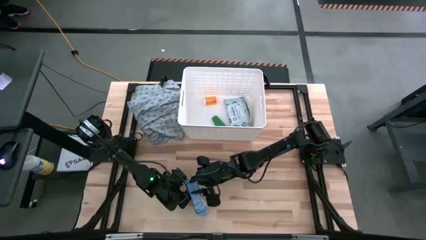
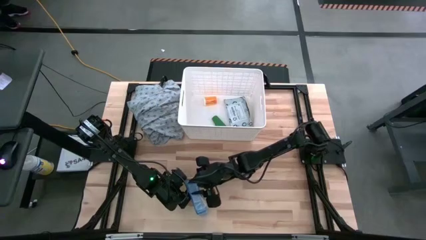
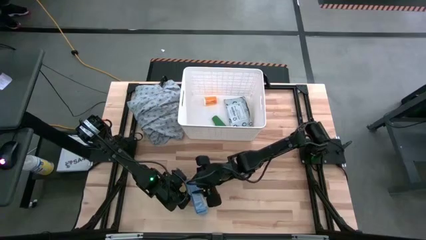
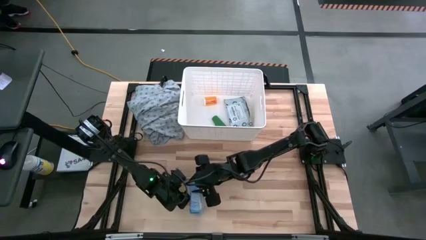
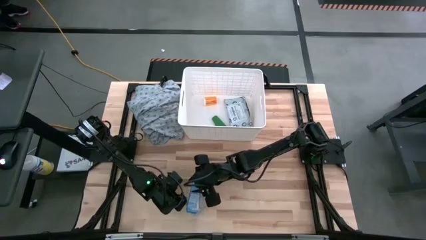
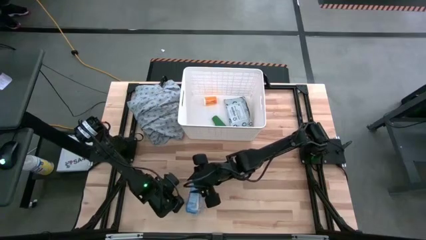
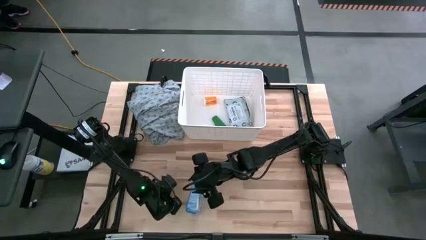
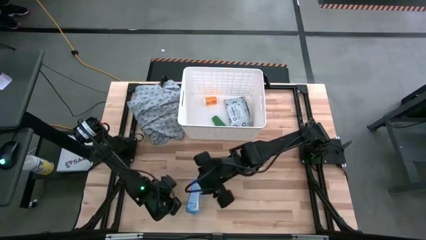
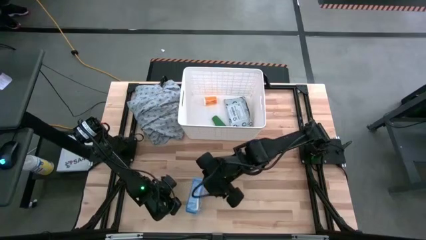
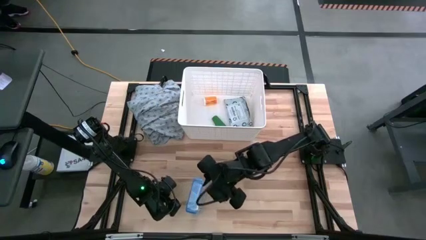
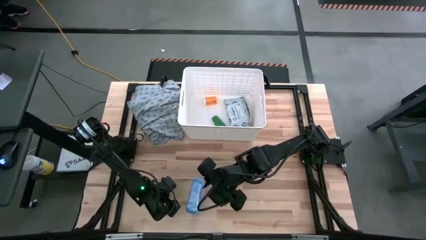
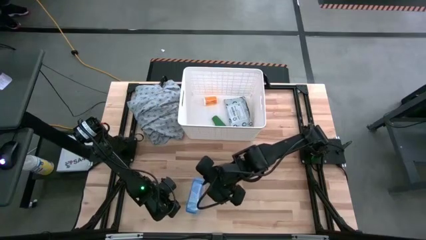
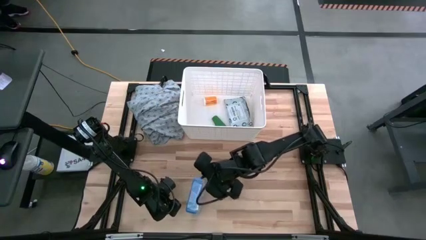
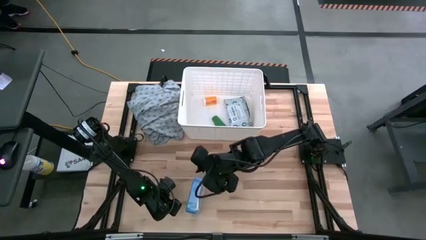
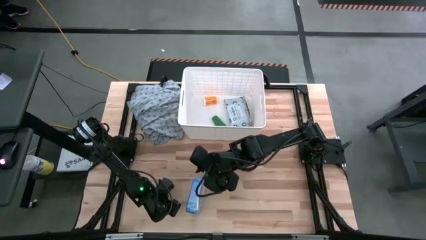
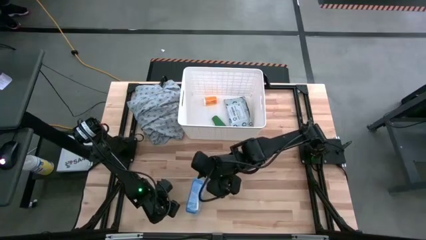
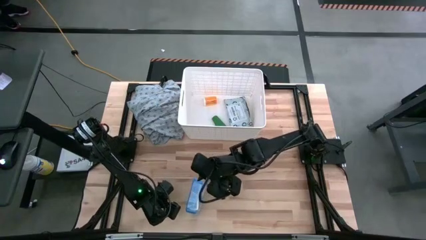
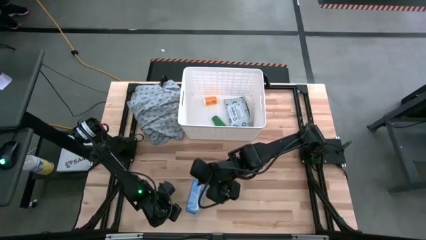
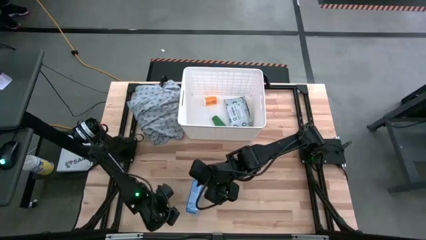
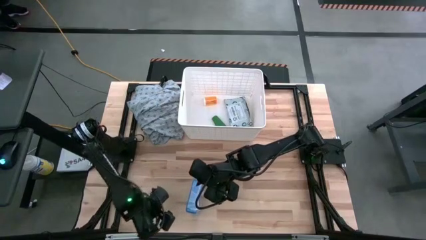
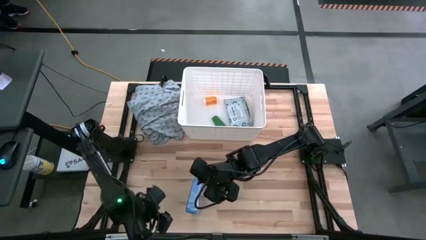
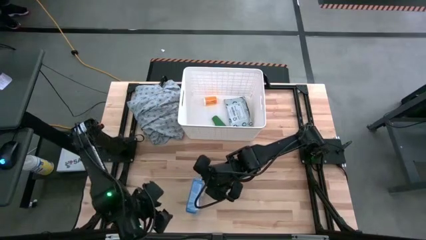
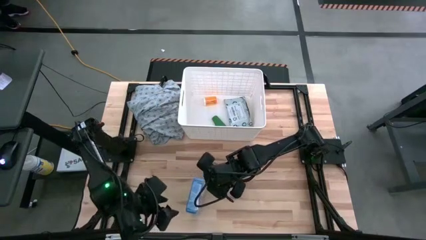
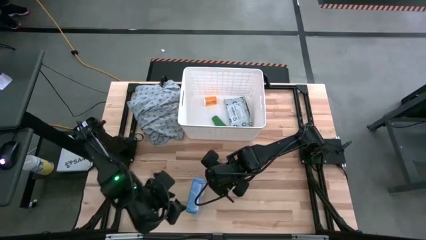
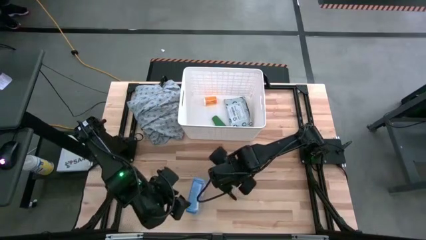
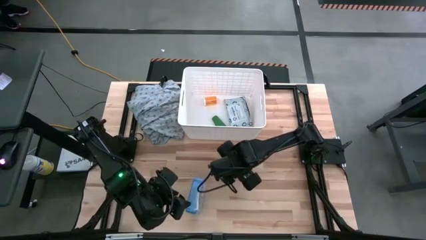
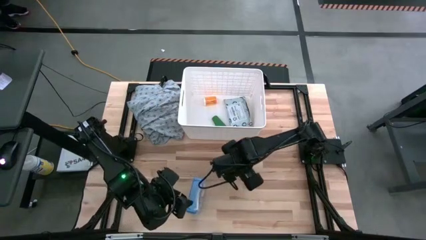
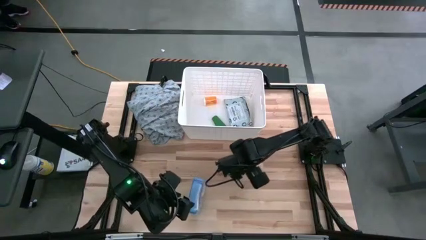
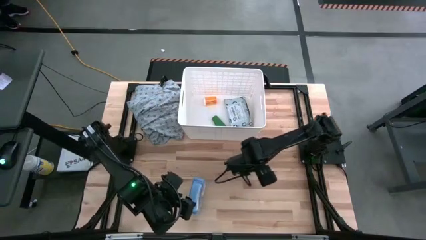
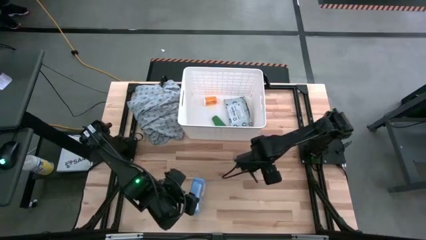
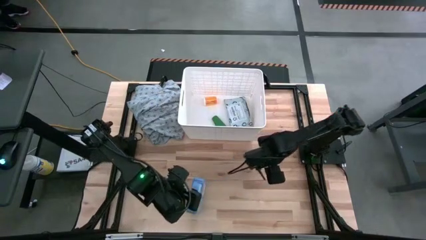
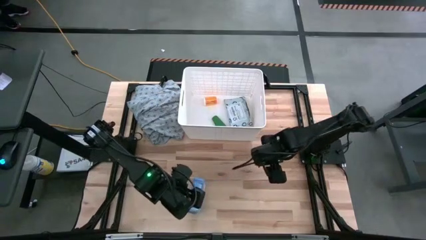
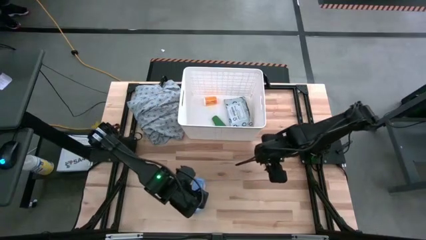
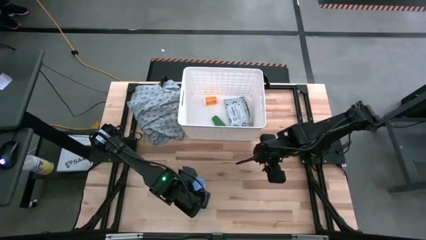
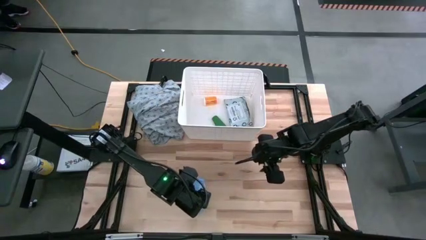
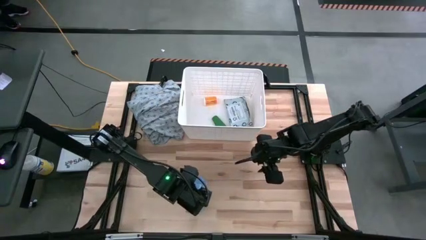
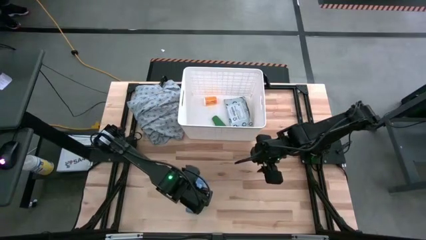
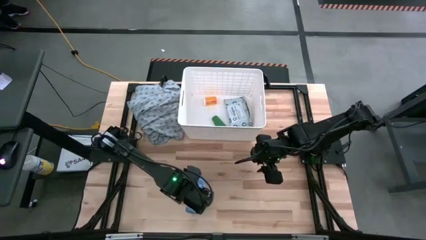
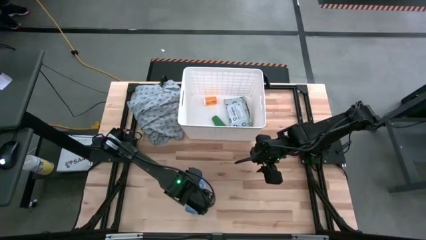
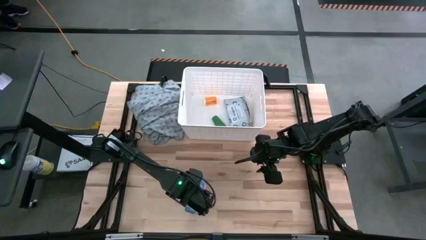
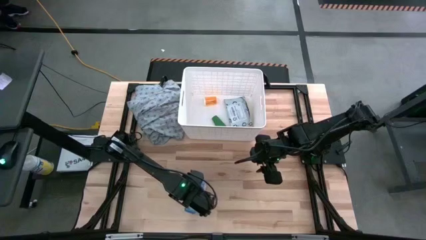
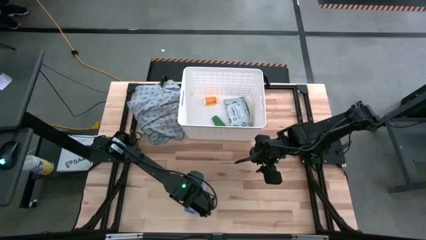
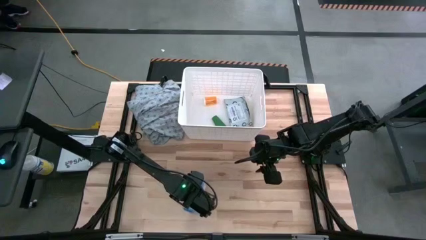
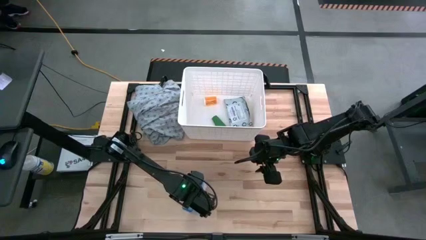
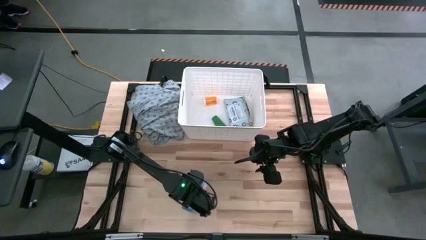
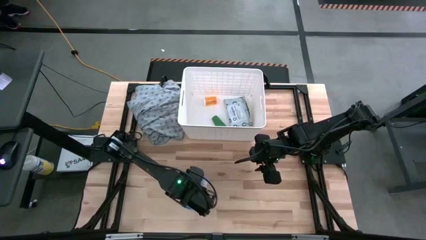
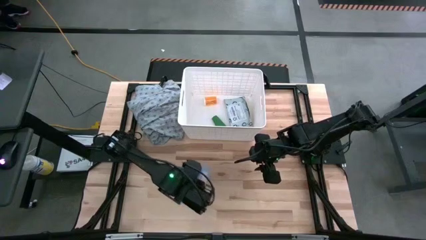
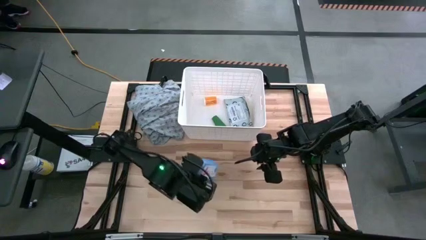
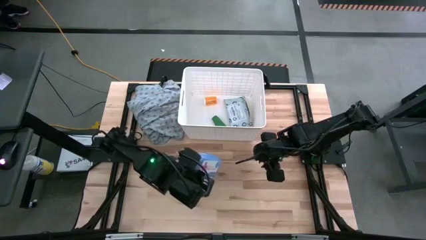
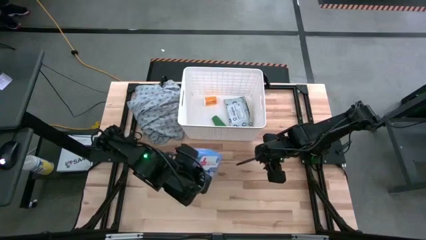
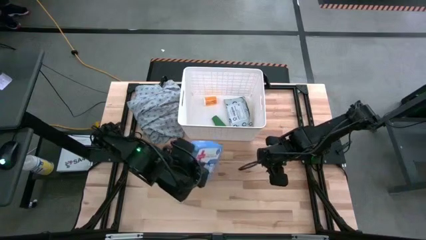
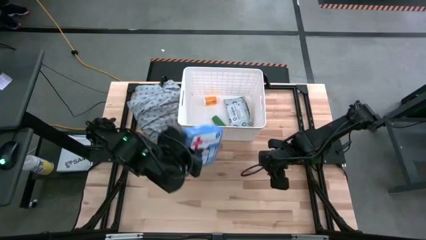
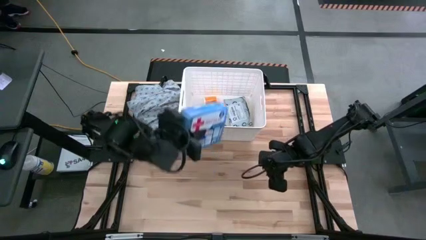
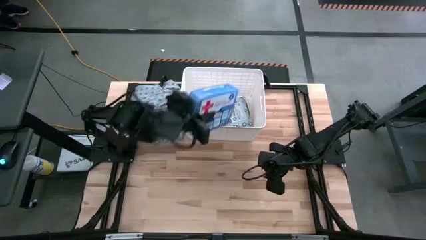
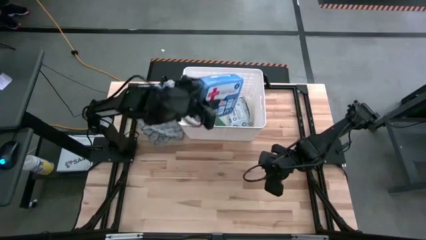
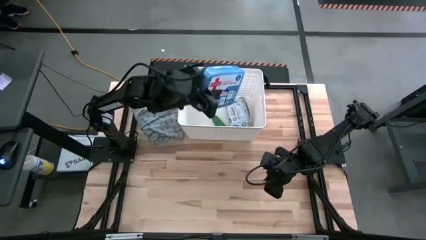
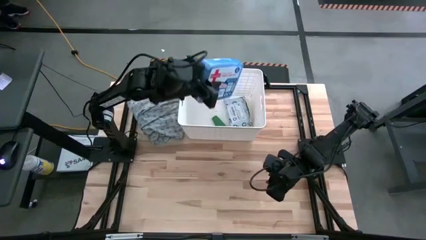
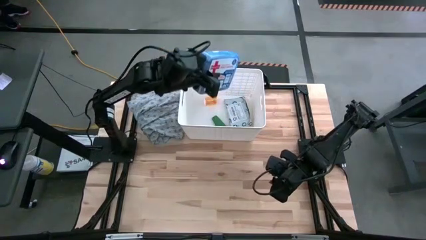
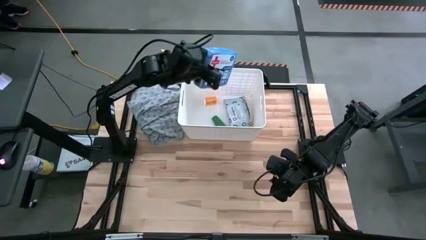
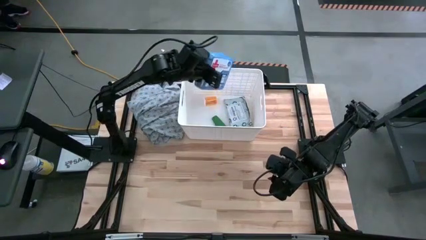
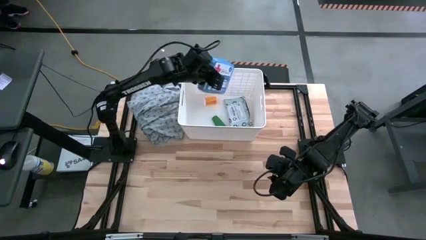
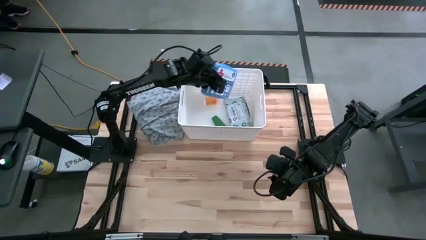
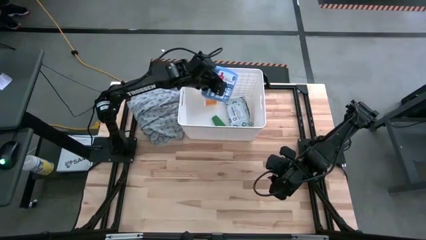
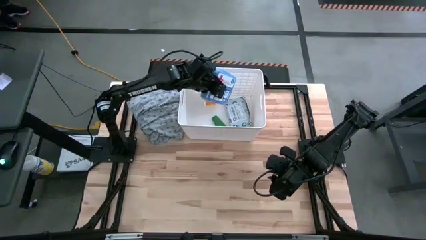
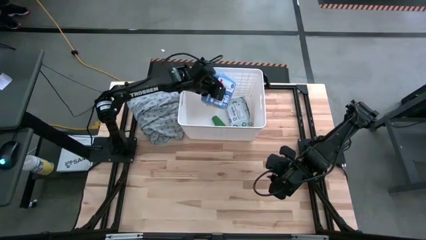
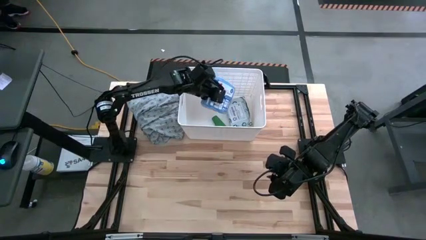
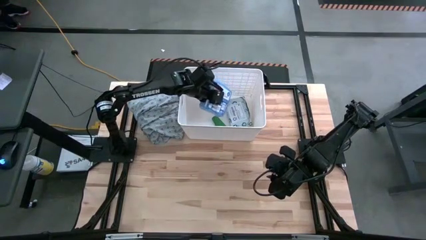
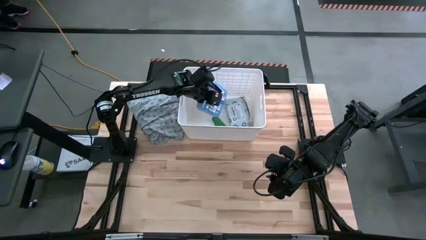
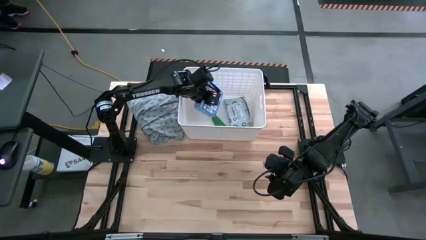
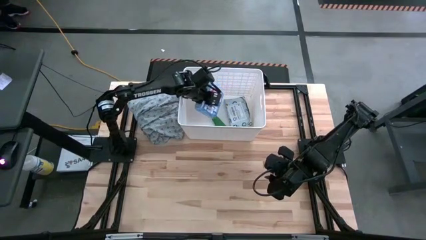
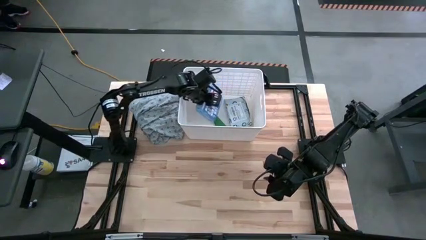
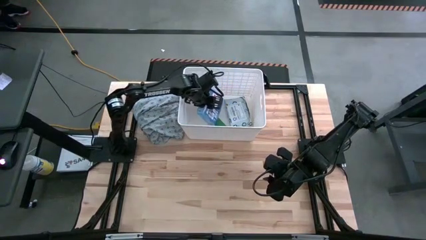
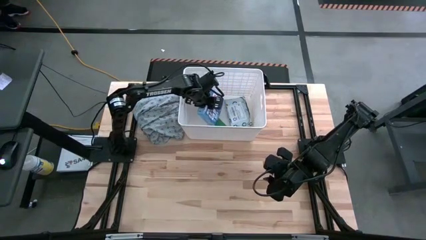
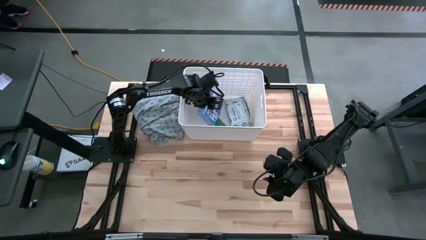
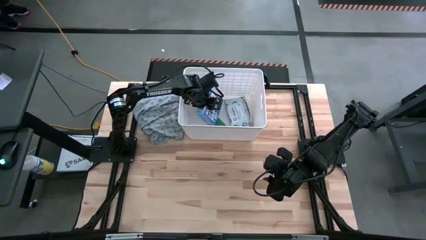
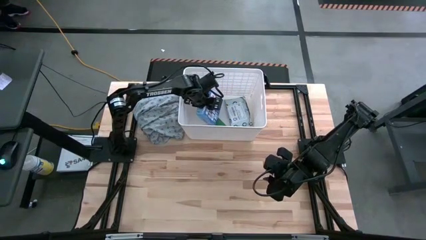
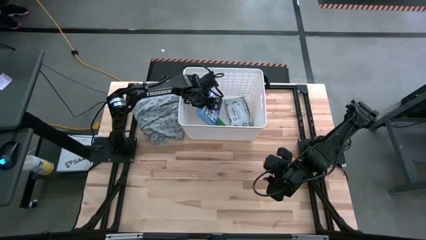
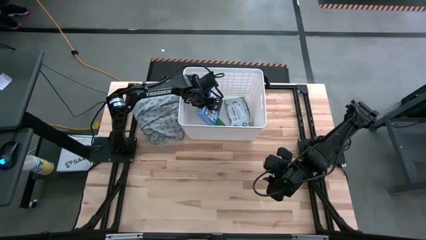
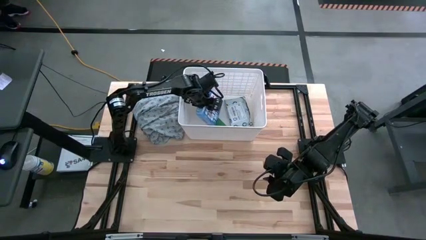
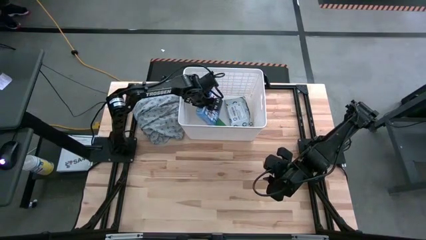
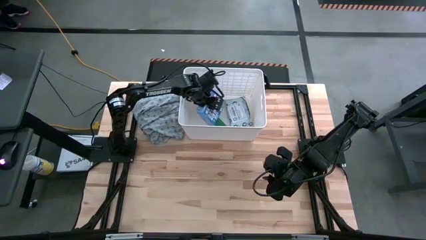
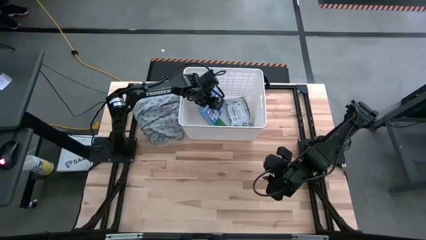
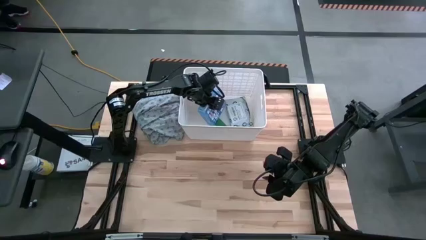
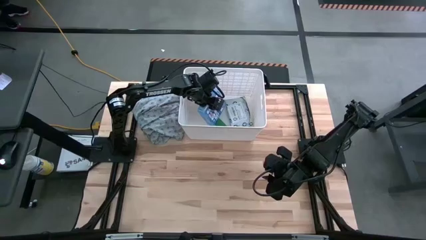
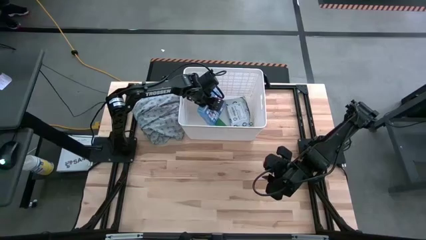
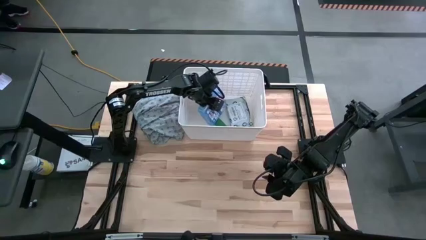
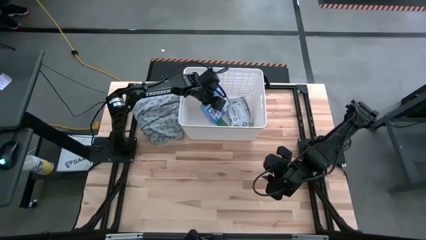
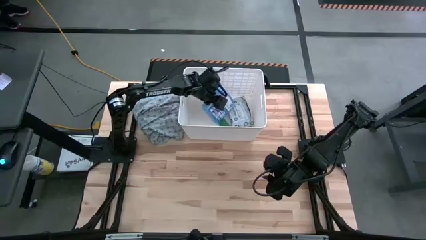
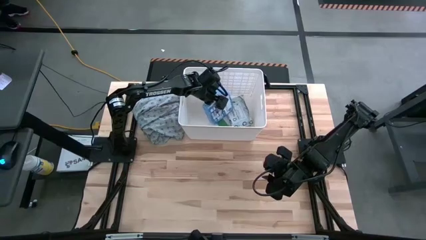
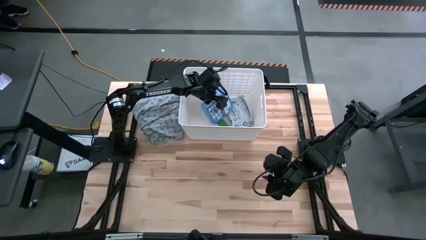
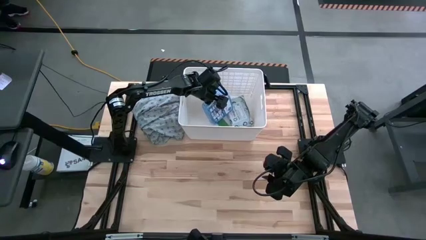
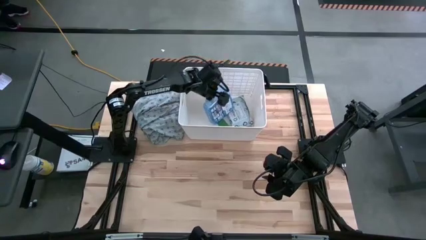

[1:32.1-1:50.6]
Task: Pick & place medical supplies in basket/bin
Put the blue first aid kit into the white bin
